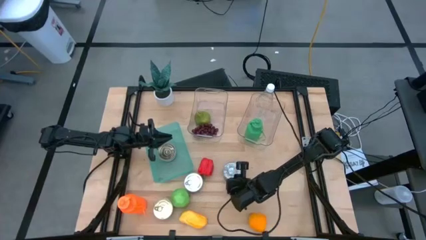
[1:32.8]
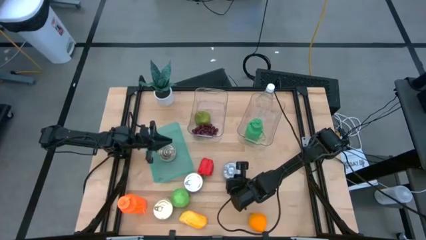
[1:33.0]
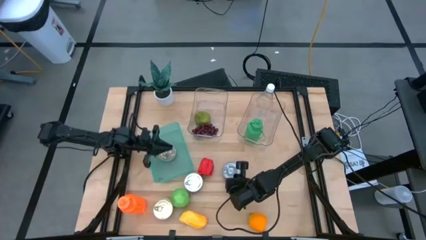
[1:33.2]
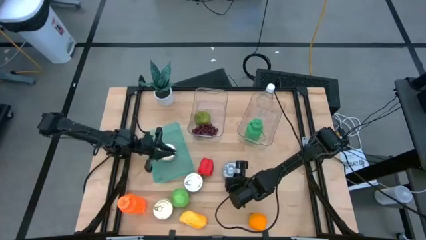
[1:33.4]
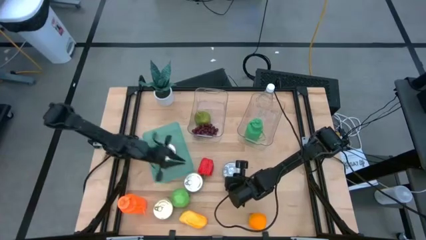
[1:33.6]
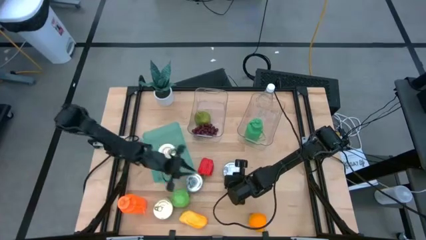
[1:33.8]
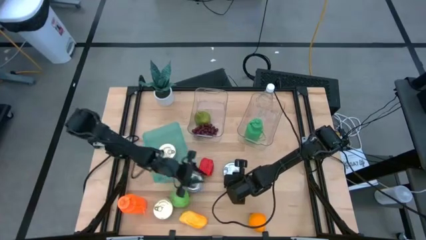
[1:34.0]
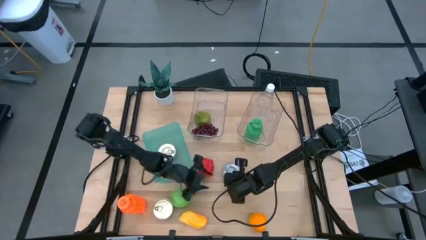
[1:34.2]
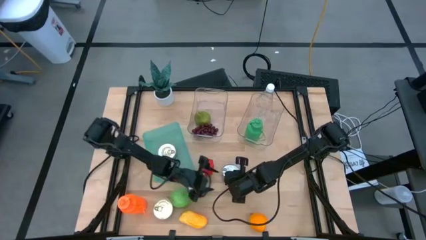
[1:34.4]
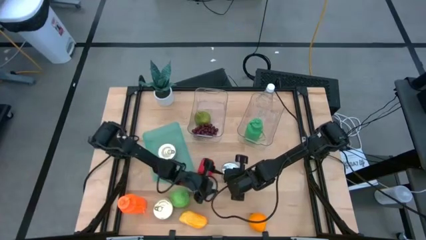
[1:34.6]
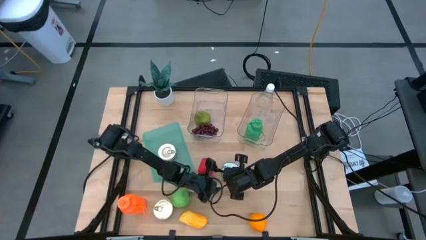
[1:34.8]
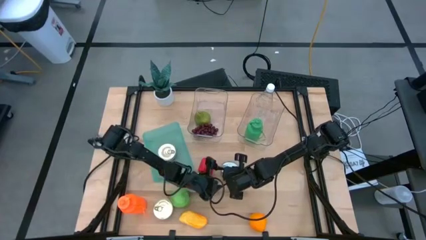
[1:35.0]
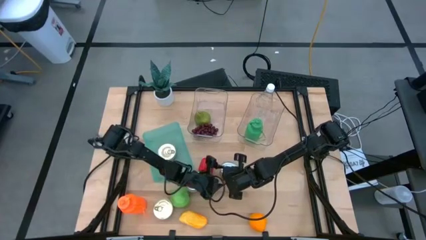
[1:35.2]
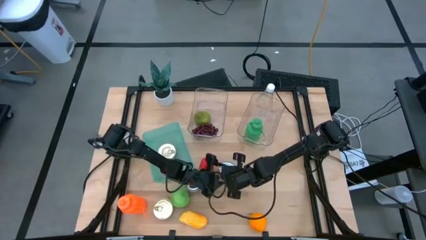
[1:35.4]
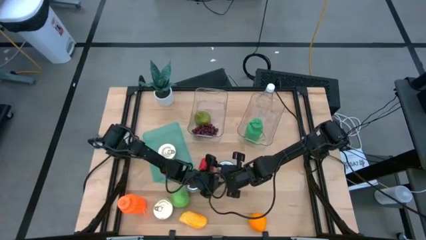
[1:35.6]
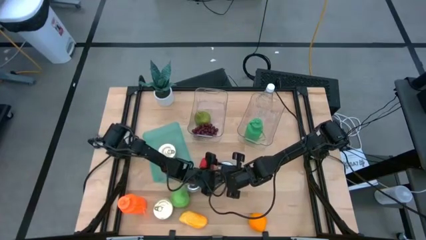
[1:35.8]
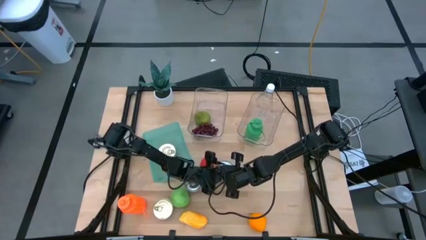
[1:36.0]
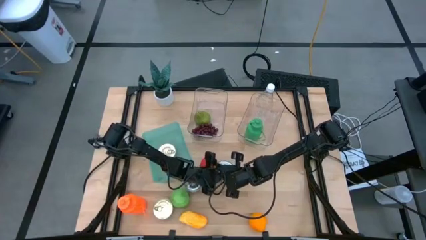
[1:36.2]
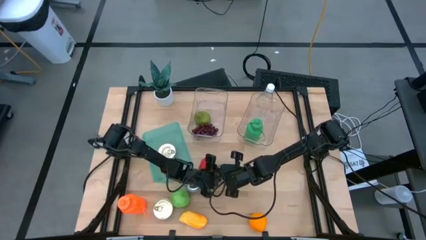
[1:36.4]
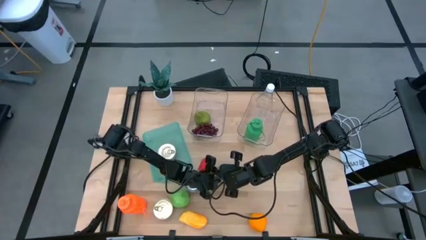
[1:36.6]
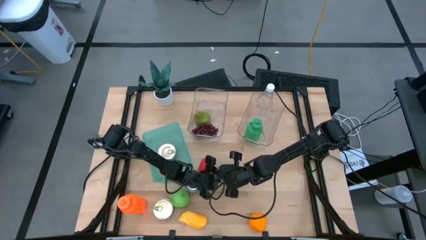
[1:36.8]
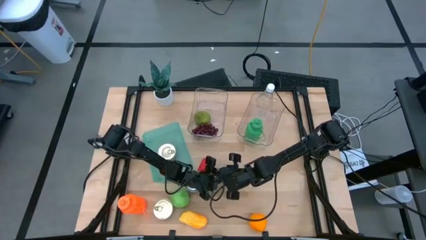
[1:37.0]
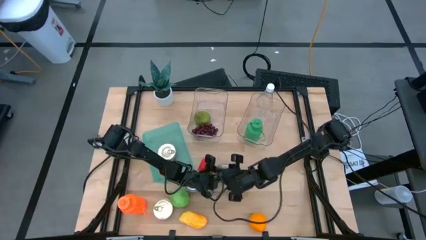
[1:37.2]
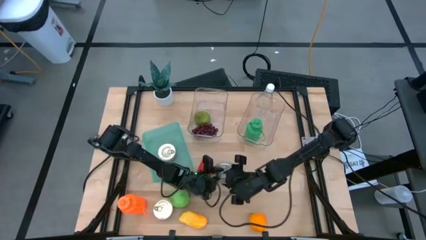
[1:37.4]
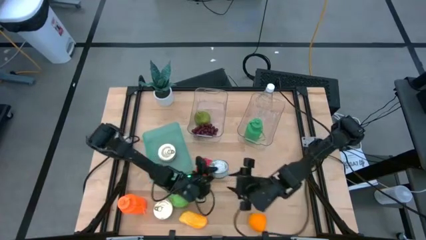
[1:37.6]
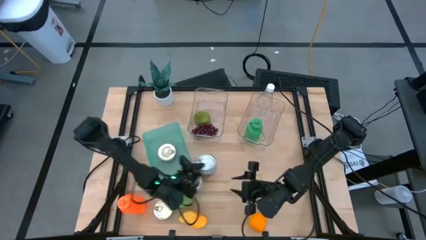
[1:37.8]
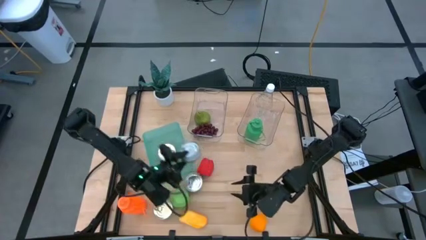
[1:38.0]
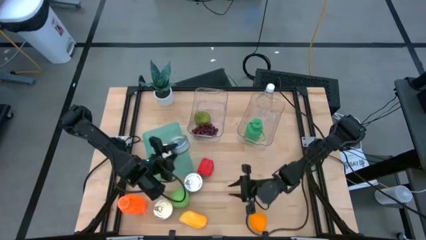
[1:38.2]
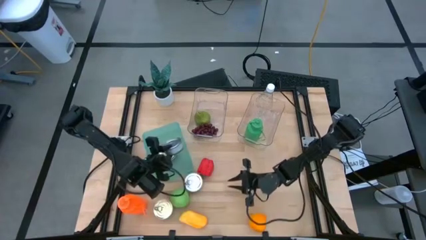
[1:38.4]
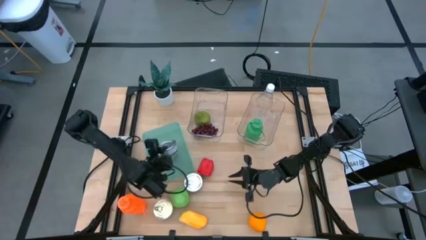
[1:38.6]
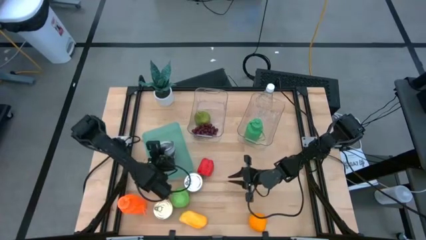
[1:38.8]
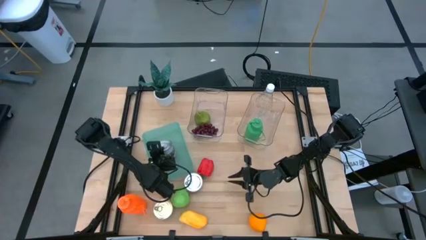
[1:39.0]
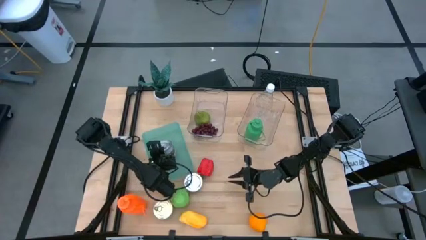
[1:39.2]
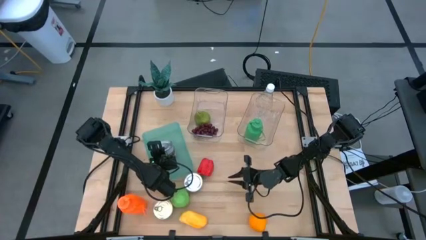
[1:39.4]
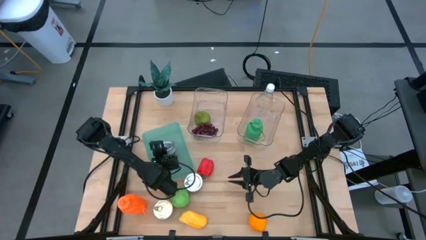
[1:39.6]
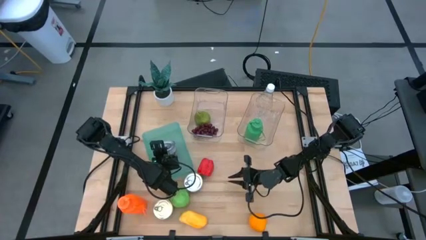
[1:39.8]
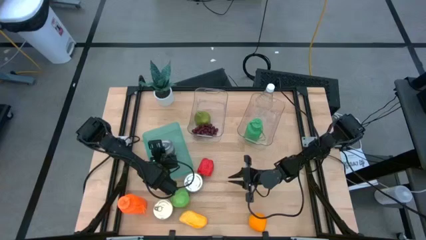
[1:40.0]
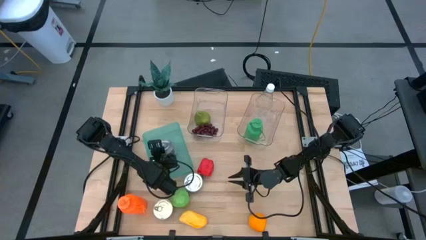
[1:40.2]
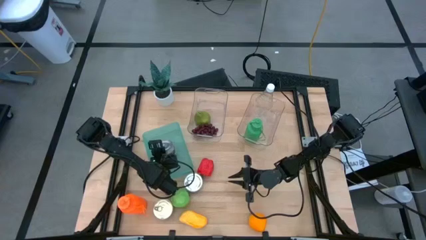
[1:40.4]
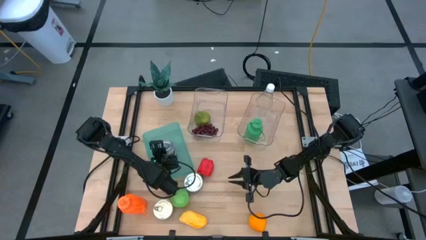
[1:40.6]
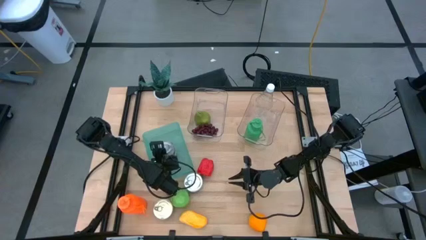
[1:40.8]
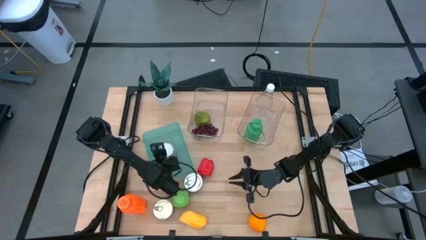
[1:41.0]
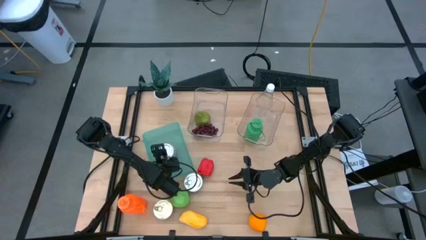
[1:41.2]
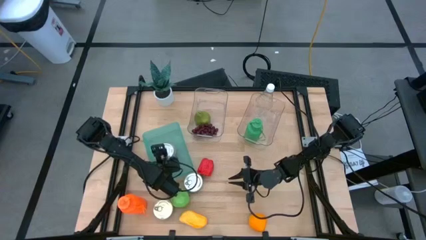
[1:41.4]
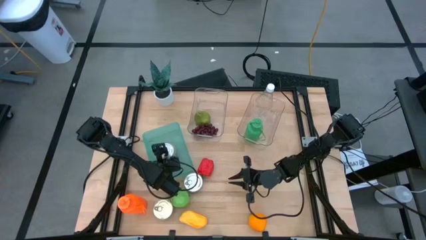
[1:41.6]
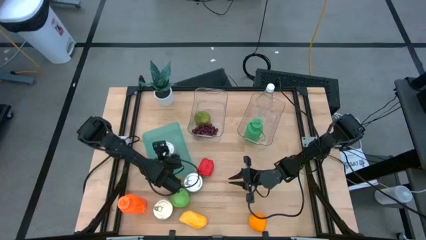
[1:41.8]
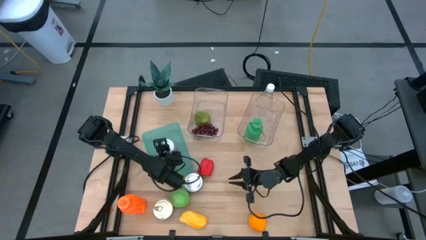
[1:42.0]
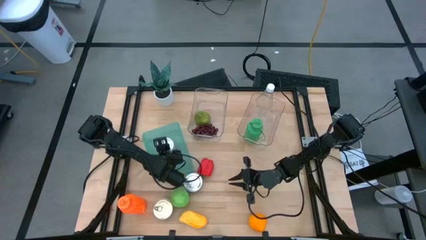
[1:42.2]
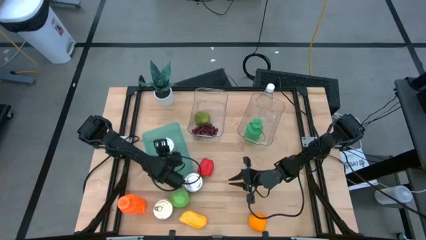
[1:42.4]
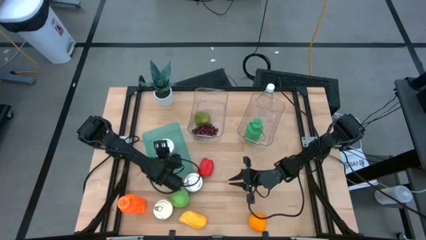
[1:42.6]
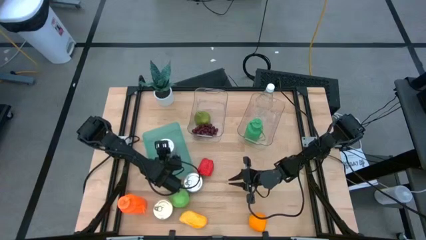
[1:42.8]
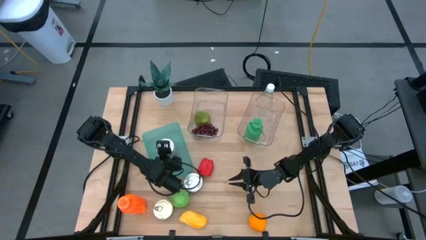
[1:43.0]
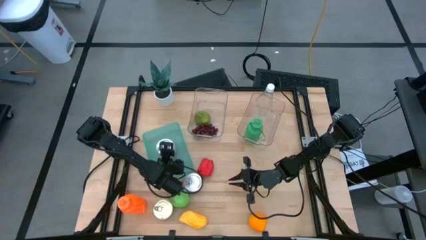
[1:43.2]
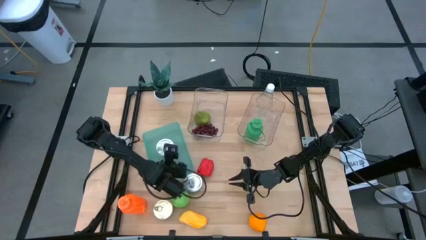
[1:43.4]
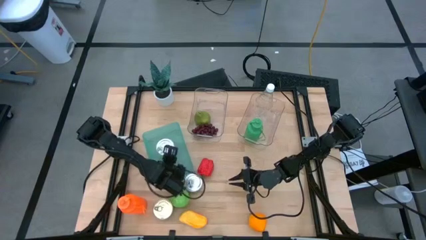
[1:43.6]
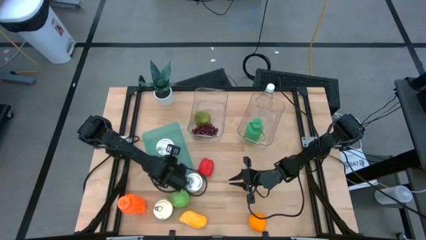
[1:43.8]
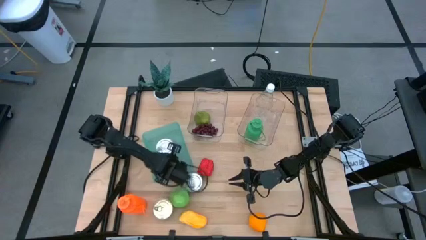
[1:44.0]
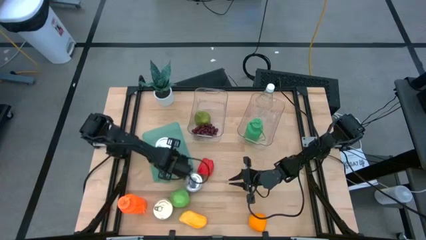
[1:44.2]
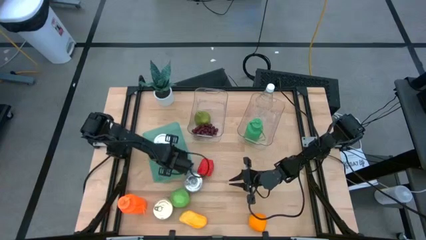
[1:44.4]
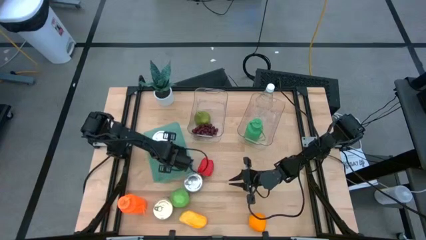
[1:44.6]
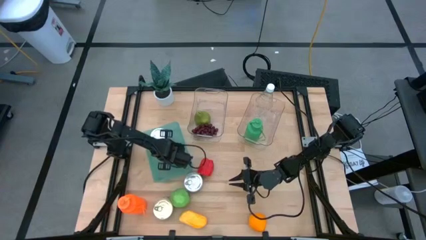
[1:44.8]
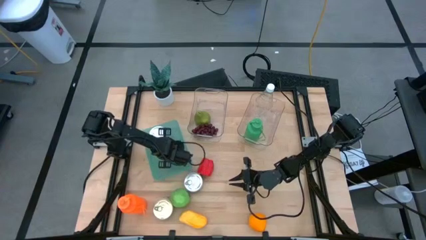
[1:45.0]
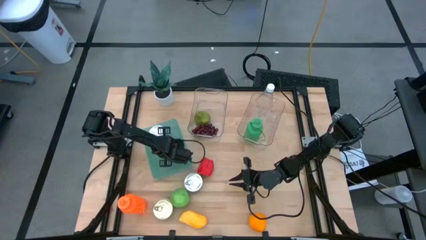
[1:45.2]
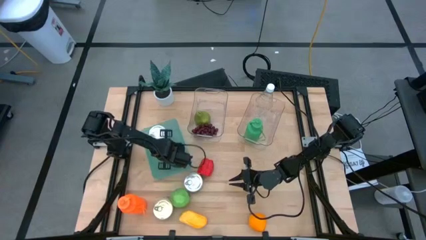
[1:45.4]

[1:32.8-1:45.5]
Task: Pick & Place Food Item
Put the bottom green tuna can into the green bin
